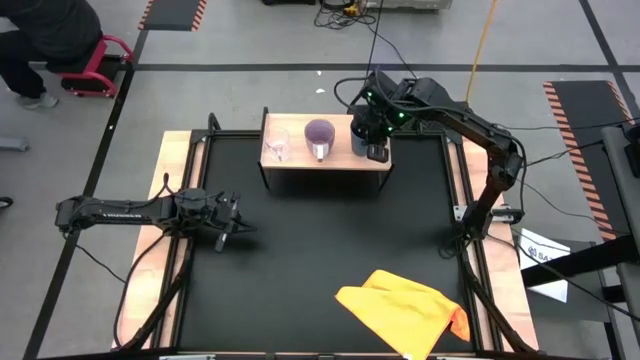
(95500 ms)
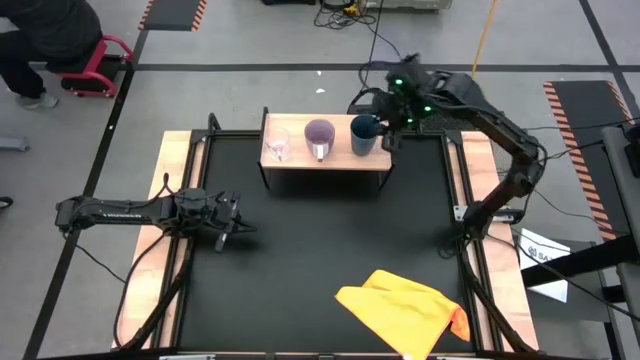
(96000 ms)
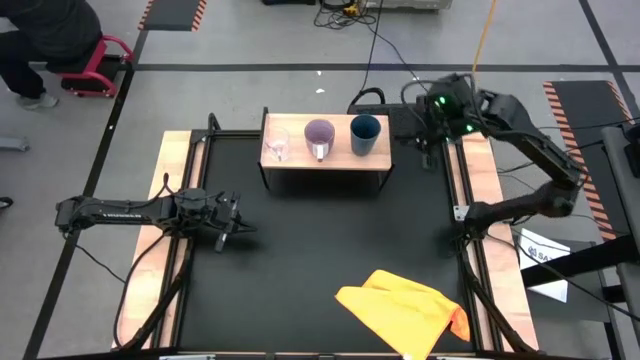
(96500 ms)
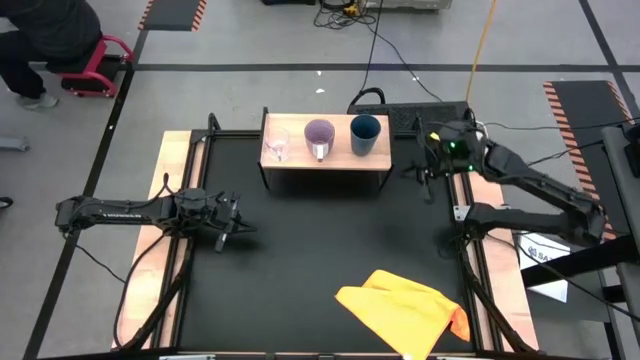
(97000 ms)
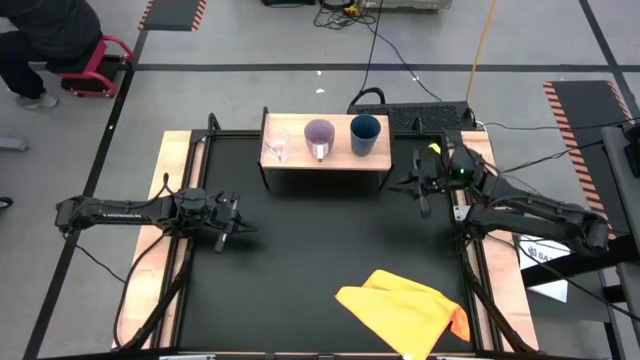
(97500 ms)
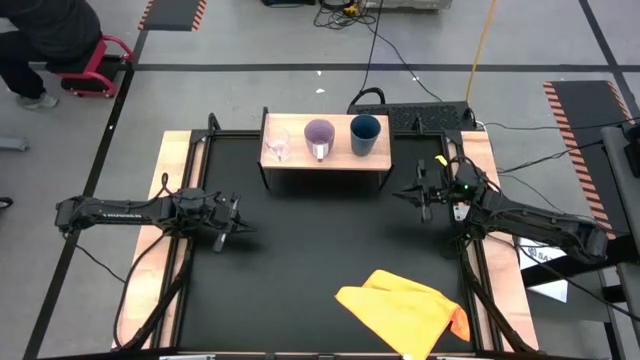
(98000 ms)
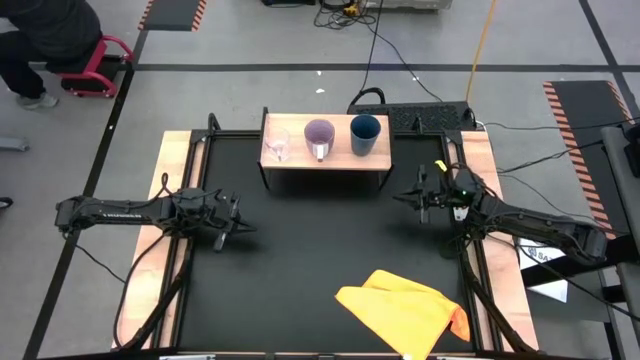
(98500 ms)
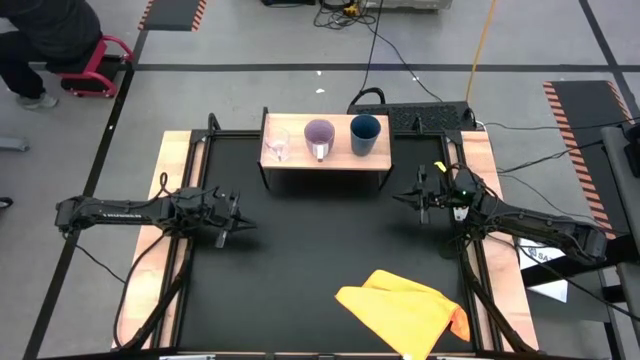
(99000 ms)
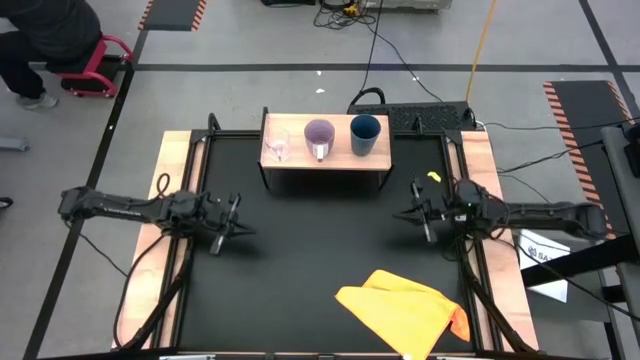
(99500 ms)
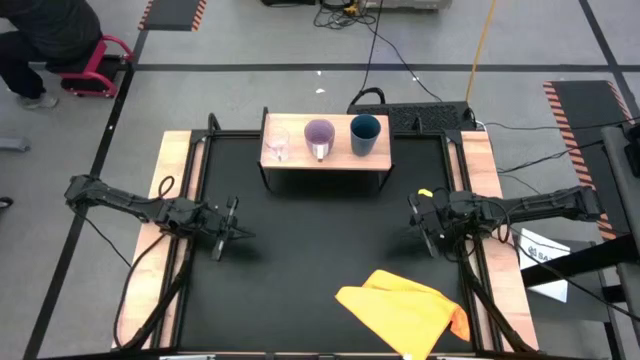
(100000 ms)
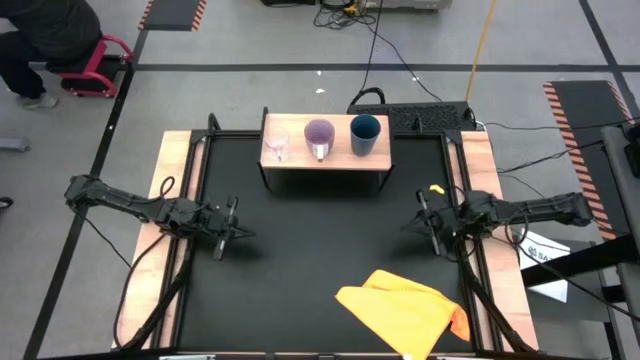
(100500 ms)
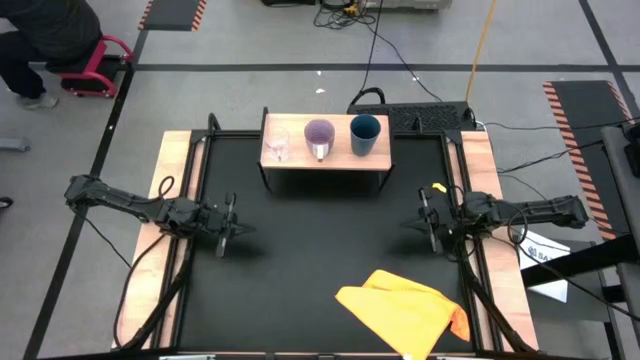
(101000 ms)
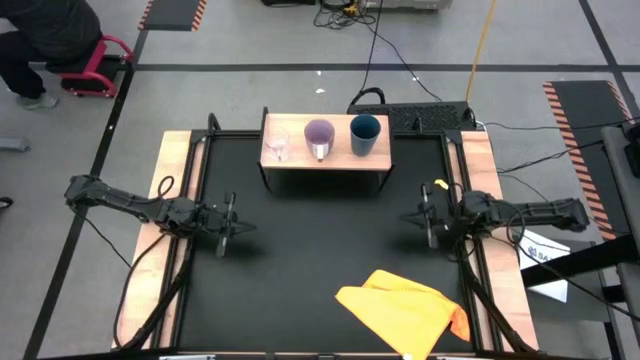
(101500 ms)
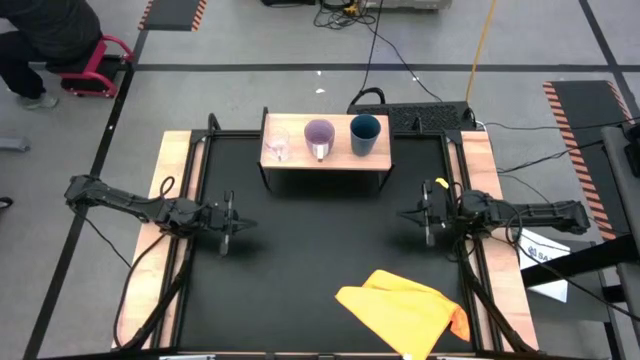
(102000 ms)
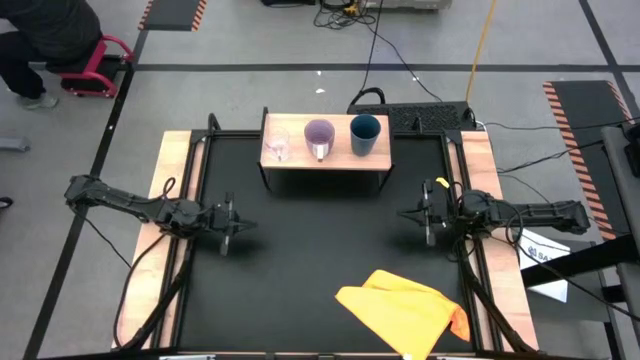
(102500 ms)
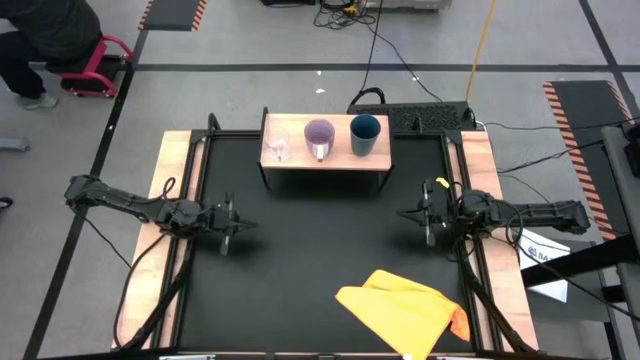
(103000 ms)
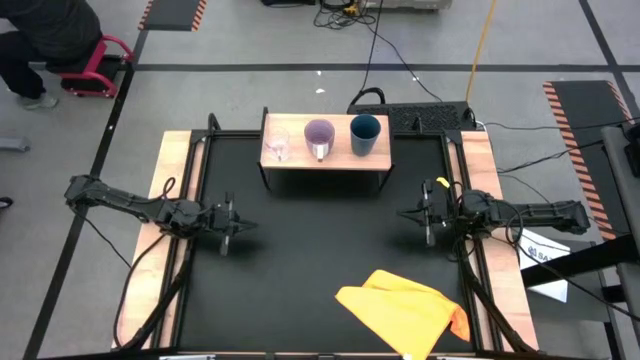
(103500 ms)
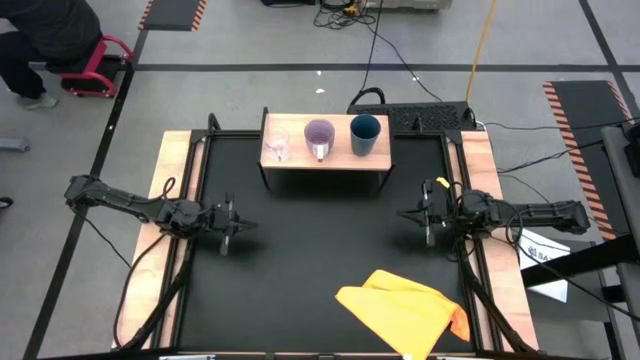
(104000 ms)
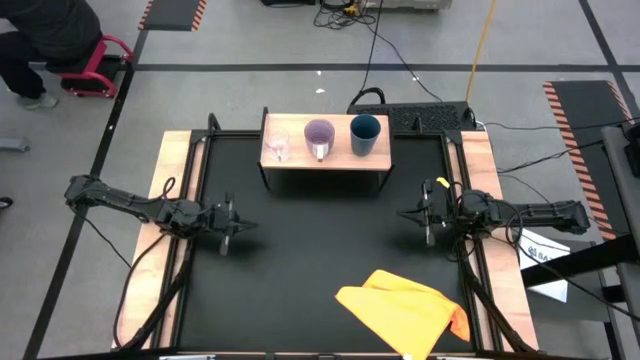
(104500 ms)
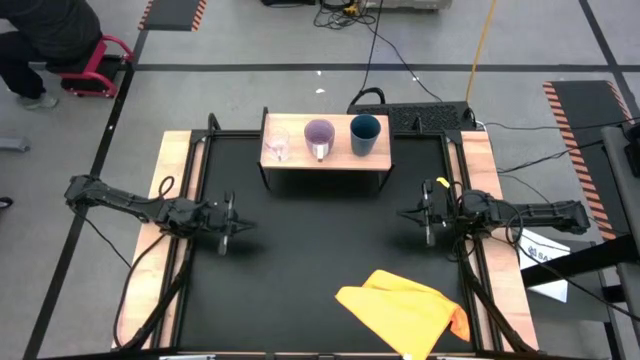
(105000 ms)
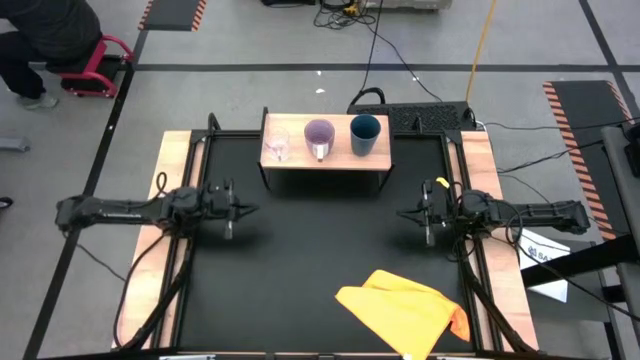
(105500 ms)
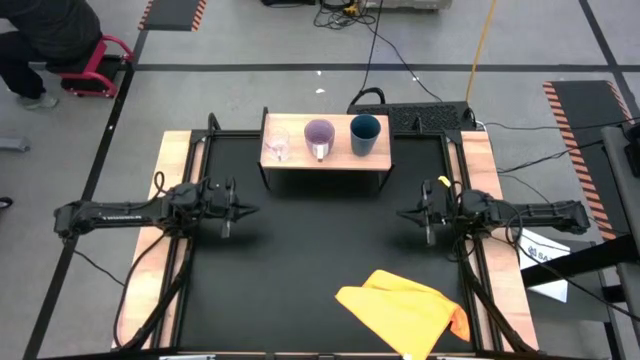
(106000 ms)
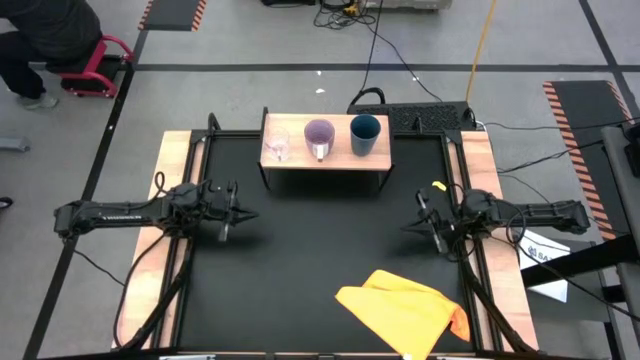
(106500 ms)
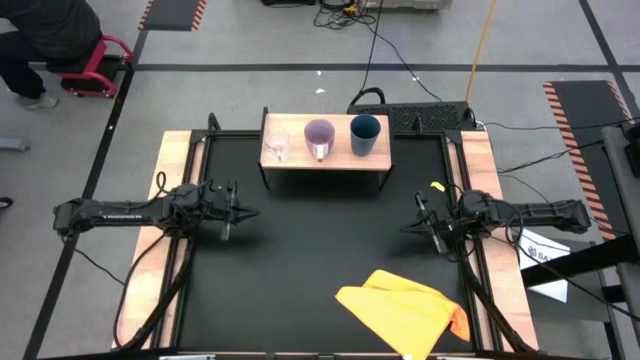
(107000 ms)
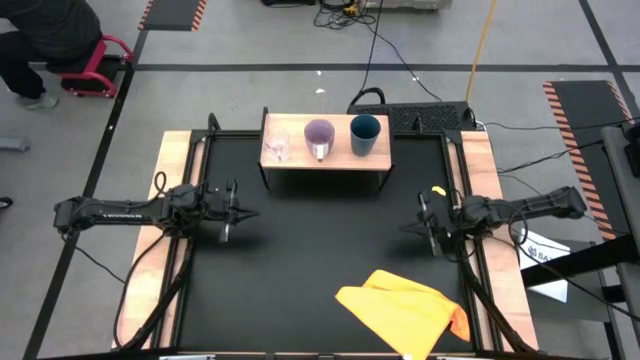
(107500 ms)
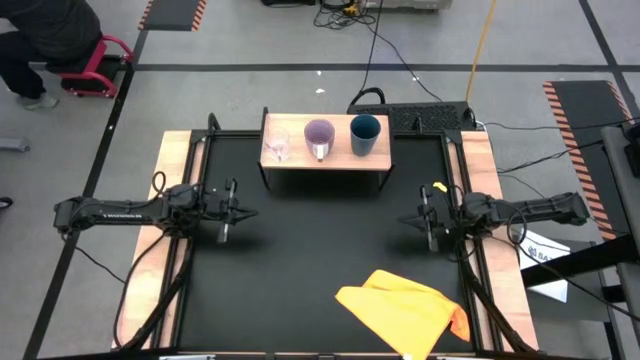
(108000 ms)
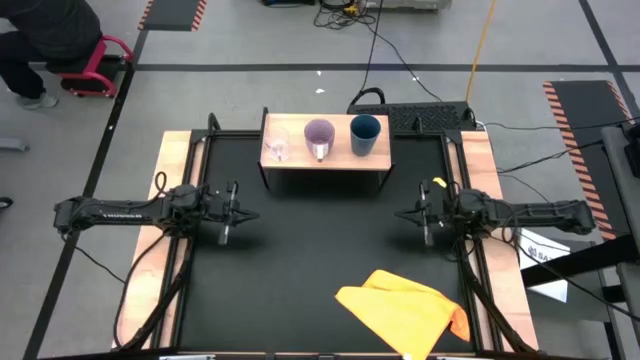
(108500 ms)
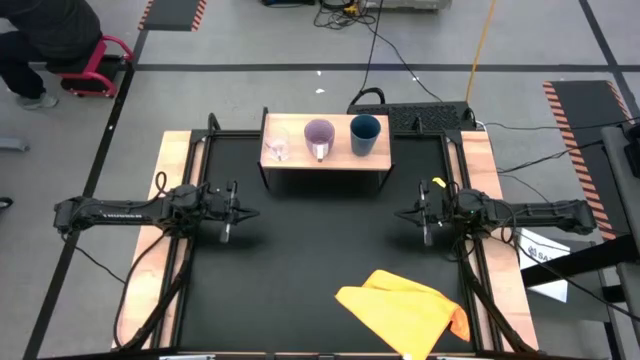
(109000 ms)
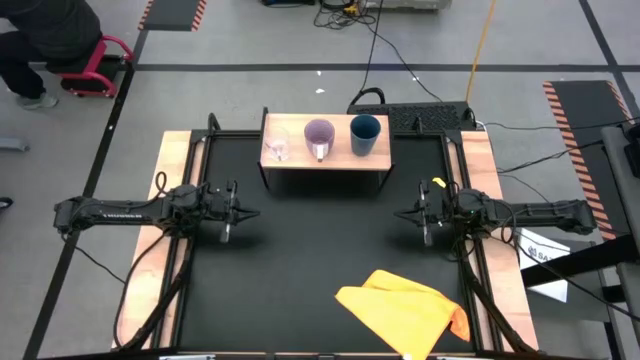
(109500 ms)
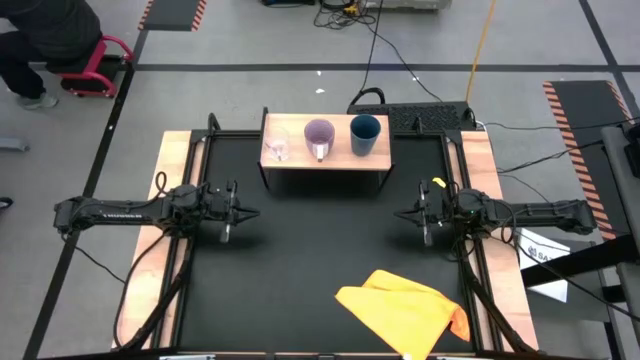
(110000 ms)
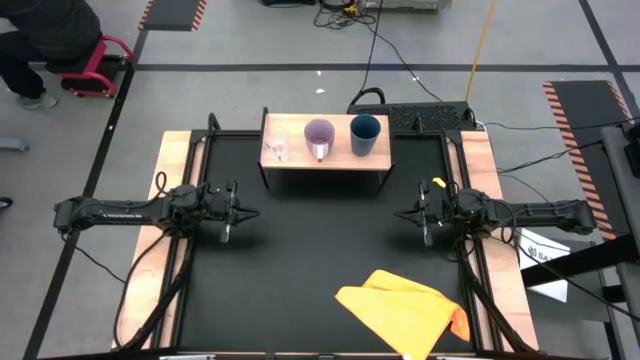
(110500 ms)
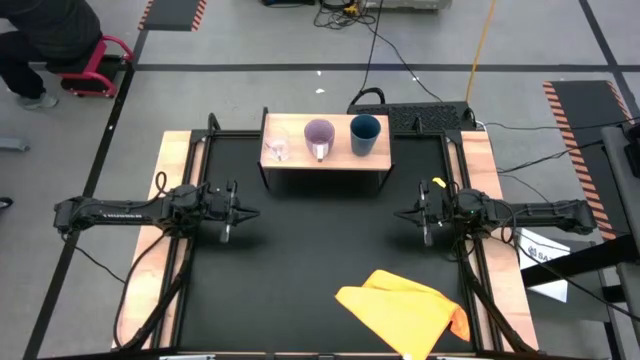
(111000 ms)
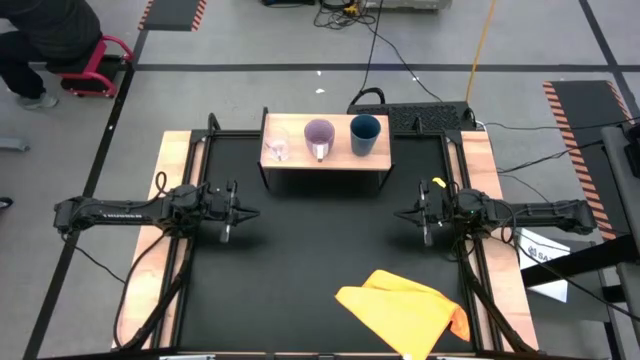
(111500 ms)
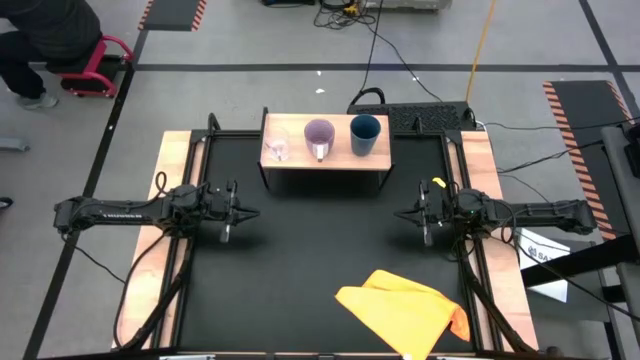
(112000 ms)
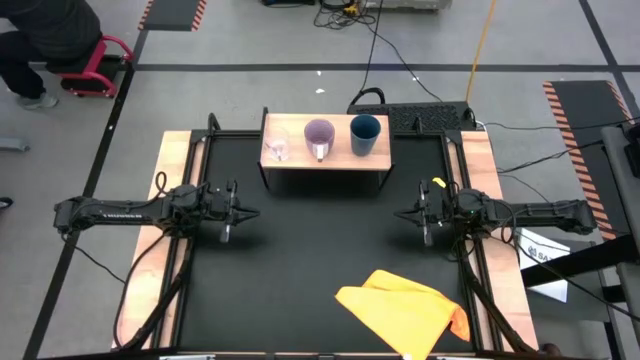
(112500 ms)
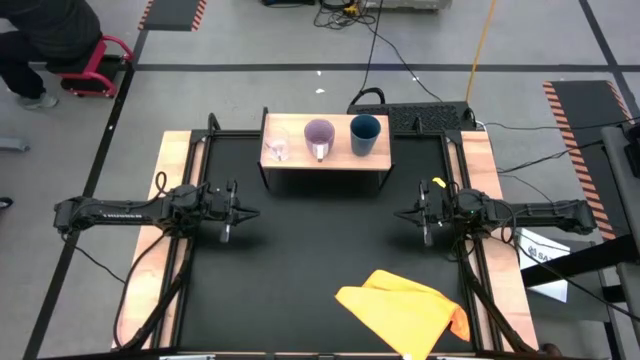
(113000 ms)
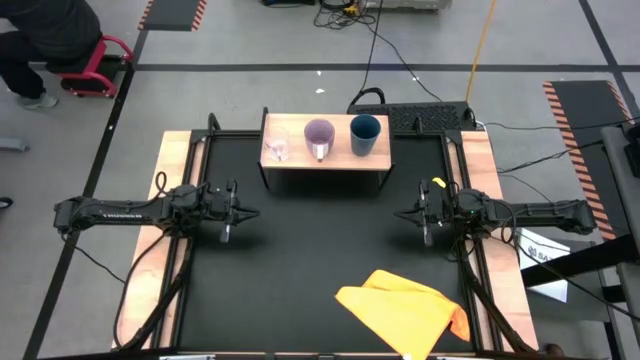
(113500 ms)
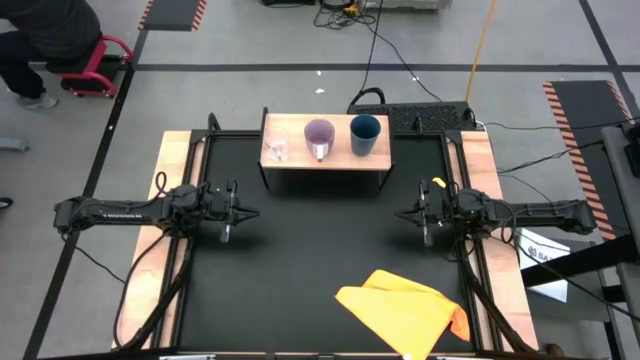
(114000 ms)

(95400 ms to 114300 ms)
Task: Stack small to large cups/mugs on shelf
Return to Home Position
